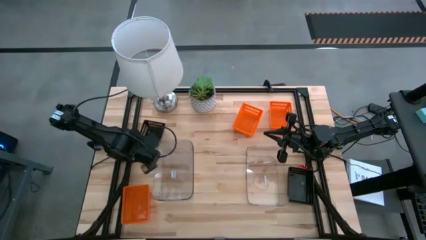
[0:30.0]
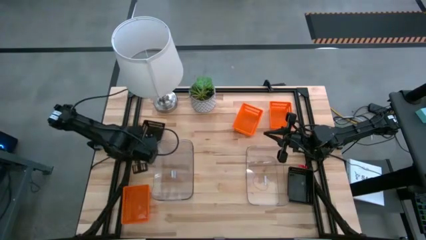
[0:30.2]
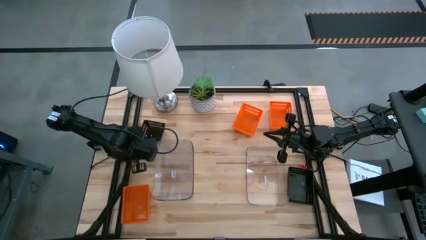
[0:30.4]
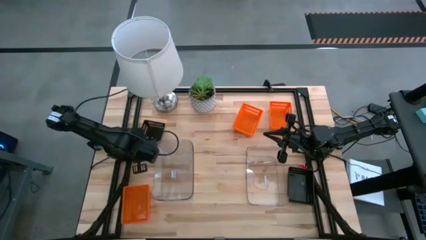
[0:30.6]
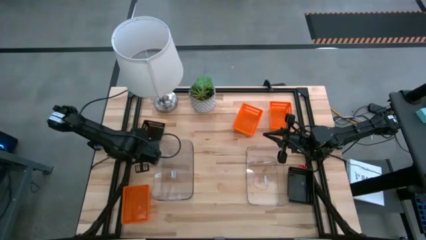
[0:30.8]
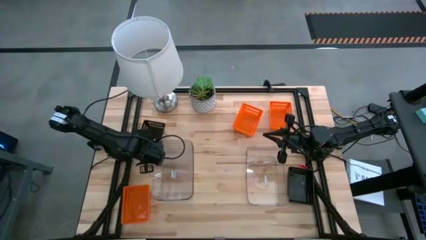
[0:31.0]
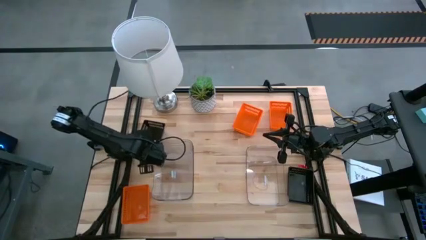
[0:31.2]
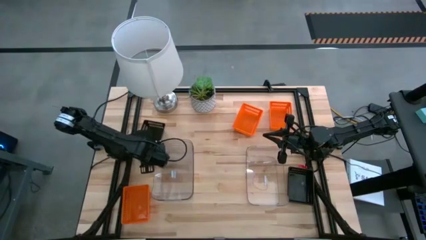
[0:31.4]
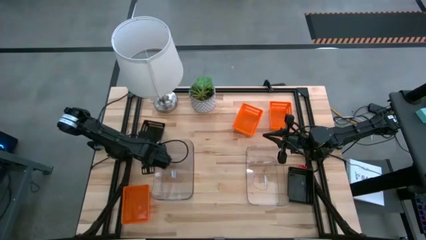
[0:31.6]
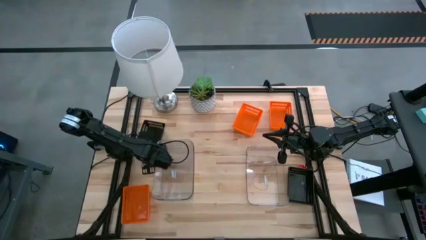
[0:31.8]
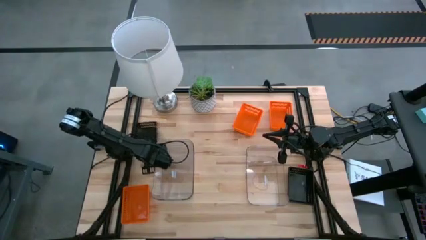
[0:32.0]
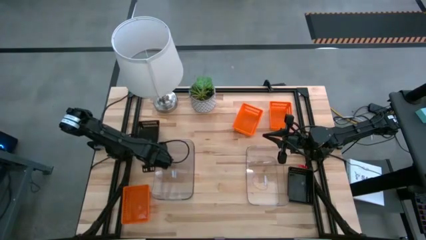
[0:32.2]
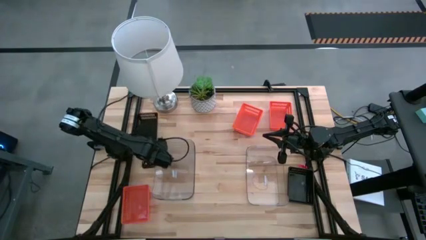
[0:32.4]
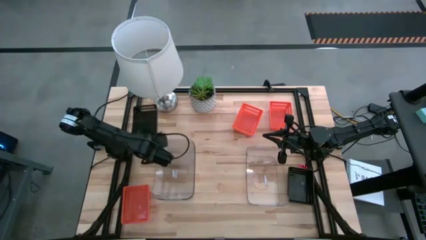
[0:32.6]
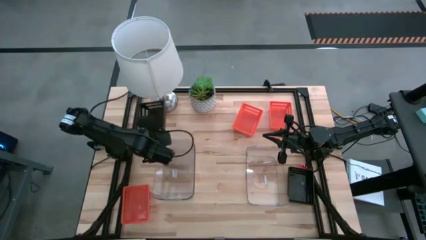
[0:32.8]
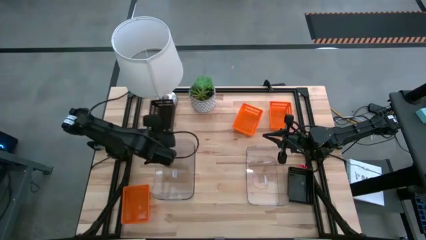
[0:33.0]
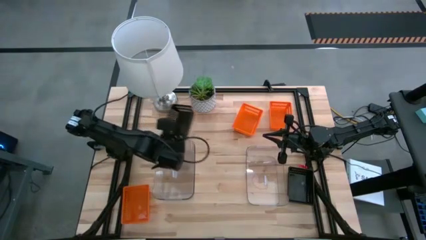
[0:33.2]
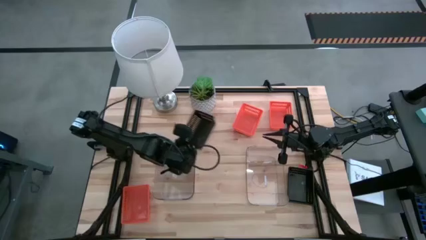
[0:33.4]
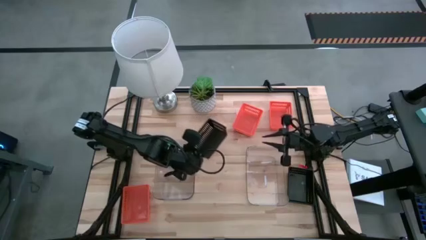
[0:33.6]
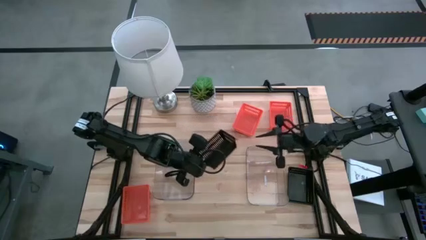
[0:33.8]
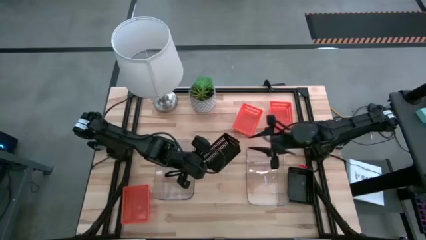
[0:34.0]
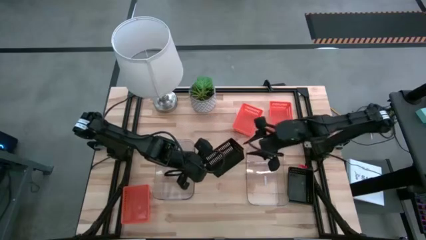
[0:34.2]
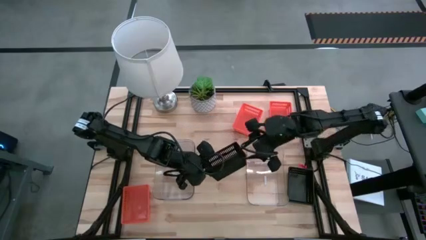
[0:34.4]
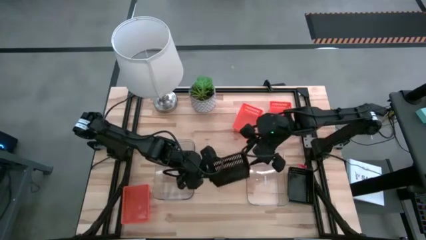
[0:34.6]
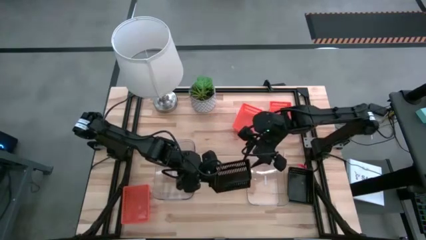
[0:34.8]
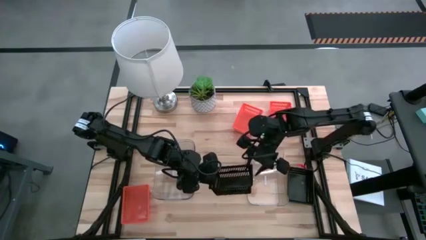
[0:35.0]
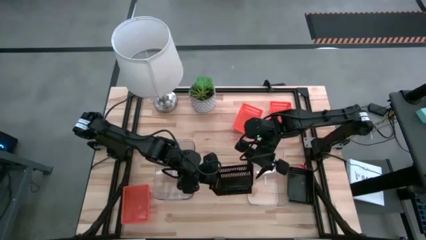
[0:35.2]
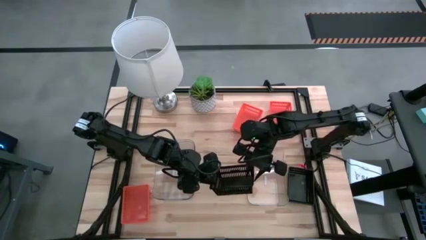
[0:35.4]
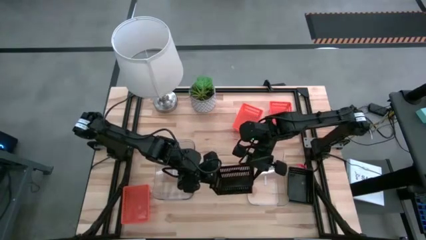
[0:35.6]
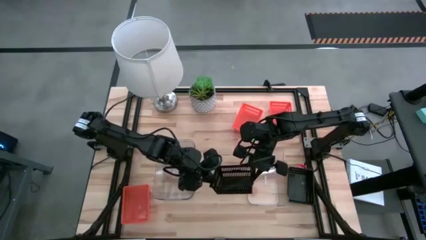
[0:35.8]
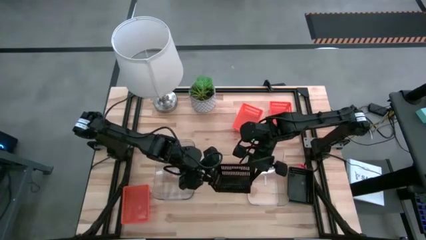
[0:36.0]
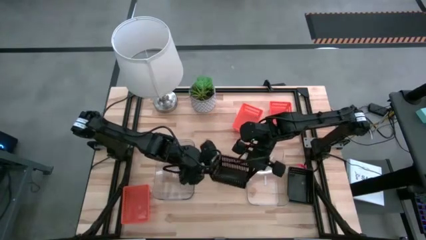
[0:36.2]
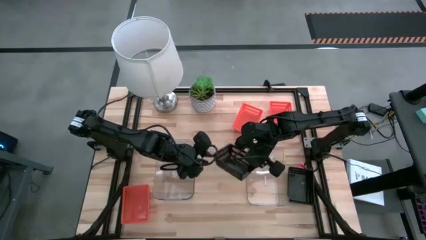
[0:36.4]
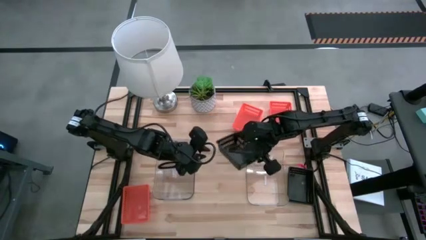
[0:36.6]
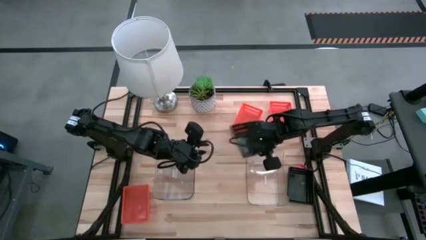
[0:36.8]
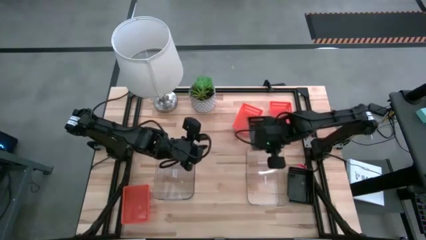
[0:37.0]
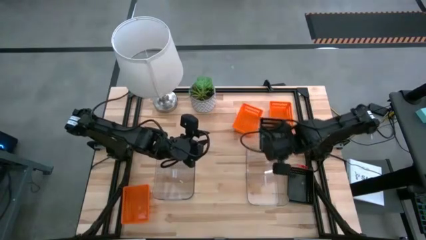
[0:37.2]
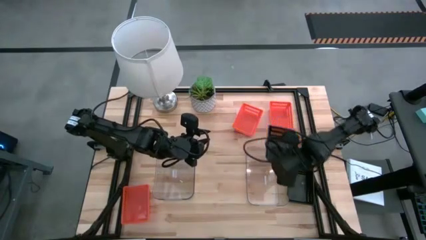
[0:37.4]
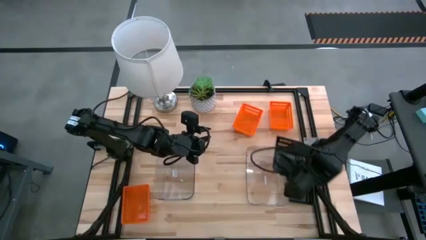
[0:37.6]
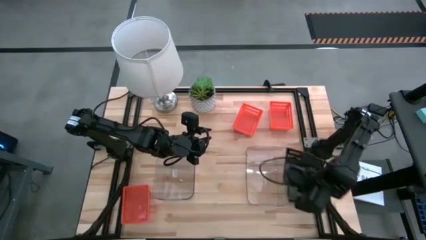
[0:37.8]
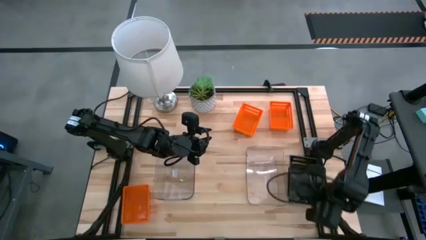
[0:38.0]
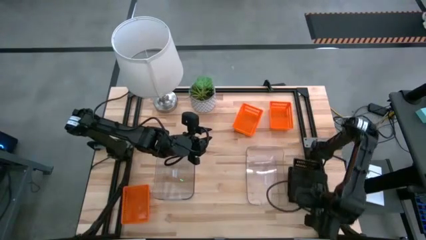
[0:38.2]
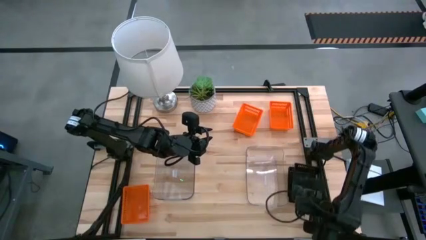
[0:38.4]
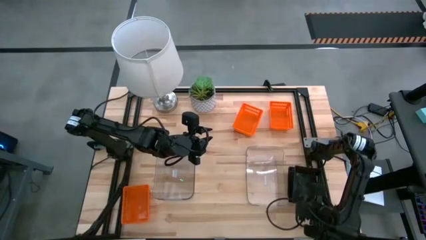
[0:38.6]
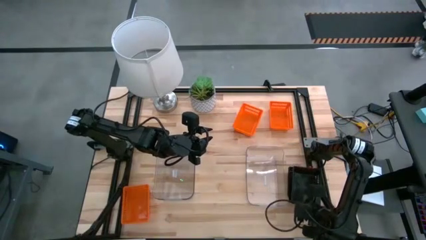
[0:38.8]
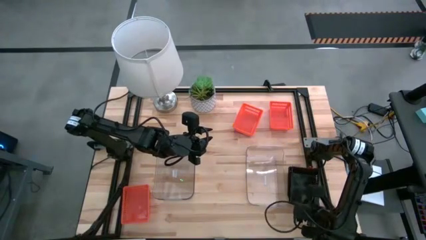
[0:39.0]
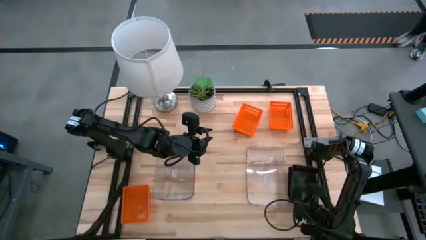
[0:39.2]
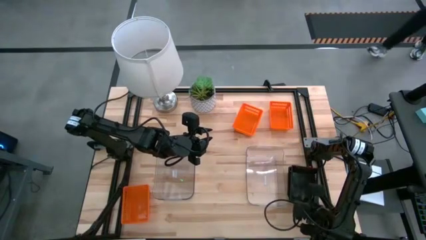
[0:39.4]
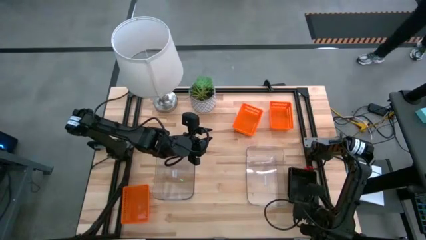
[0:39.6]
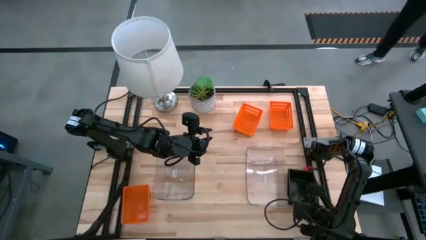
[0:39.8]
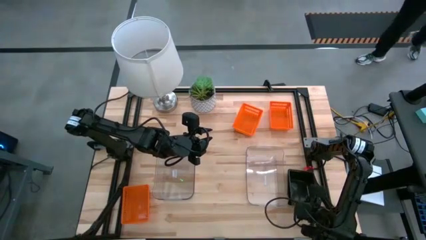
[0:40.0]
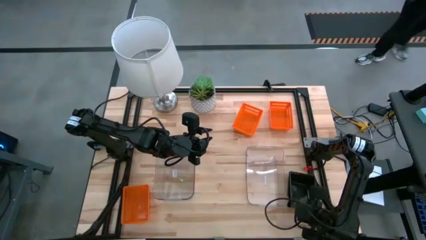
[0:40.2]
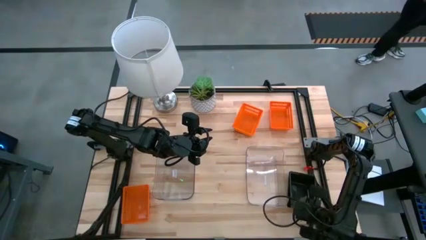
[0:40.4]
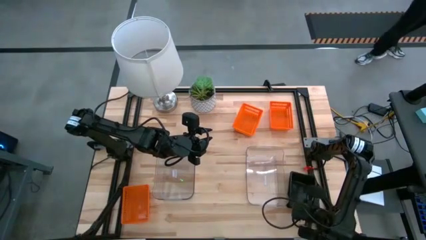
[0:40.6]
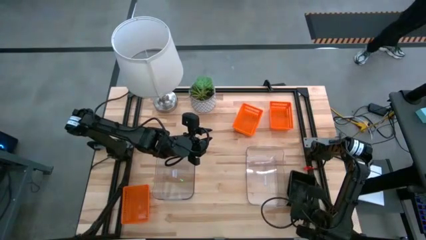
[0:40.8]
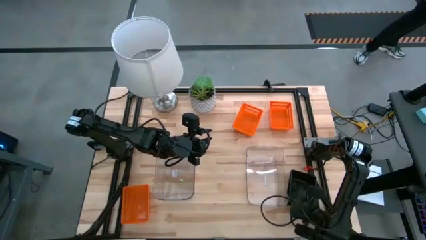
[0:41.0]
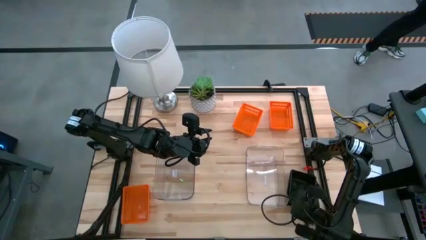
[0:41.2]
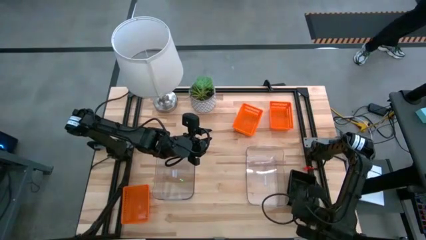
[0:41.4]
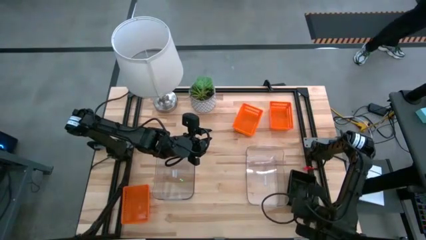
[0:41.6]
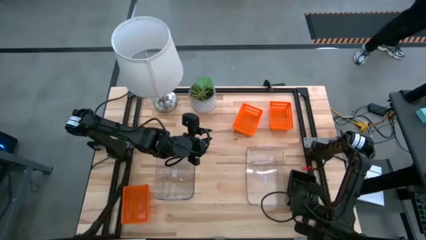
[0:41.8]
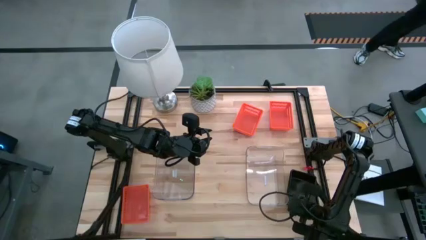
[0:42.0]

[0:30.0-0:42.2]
Stack the left black bin on the right stacked black bins
